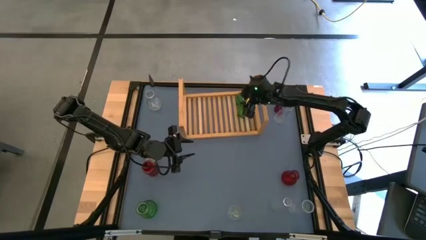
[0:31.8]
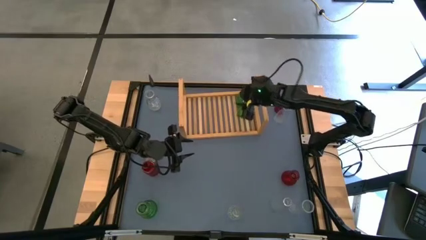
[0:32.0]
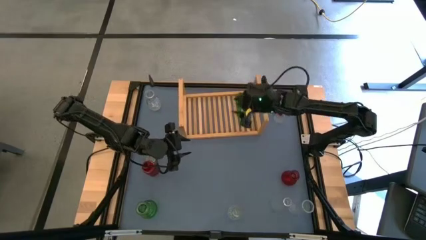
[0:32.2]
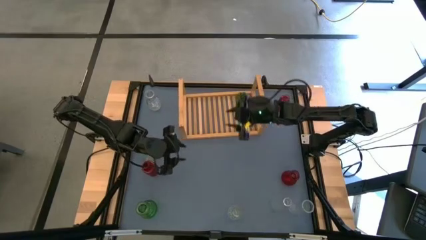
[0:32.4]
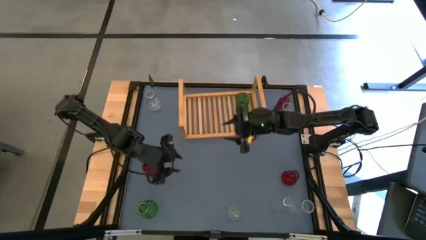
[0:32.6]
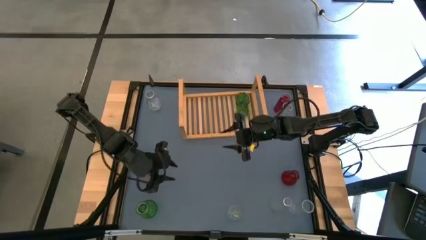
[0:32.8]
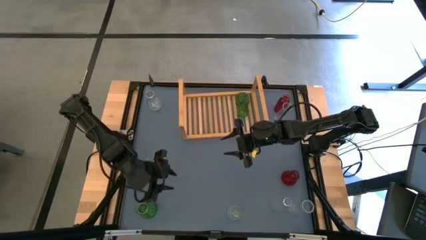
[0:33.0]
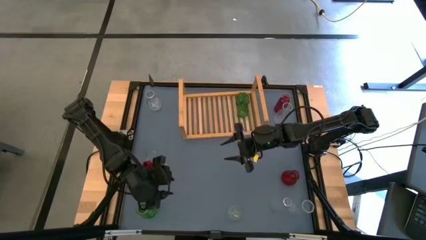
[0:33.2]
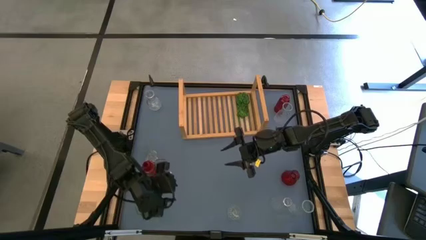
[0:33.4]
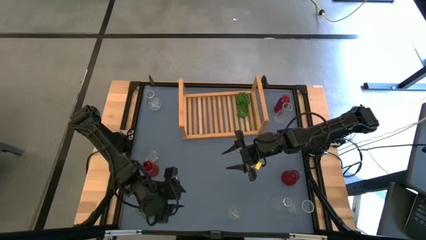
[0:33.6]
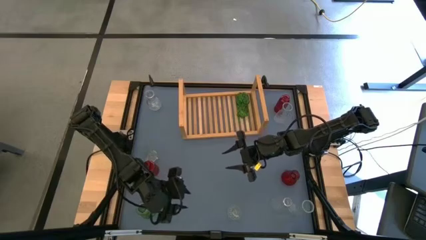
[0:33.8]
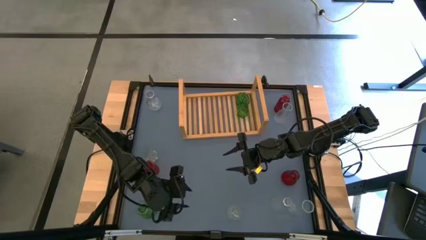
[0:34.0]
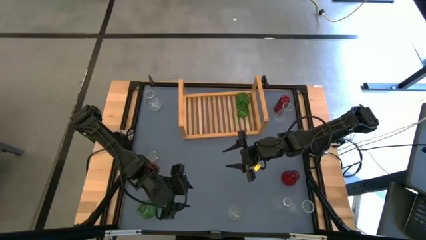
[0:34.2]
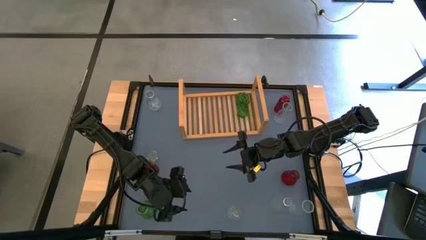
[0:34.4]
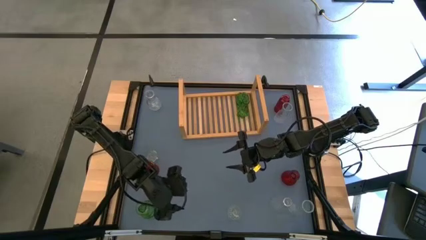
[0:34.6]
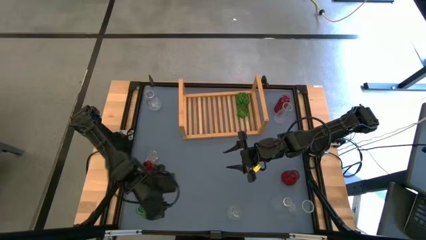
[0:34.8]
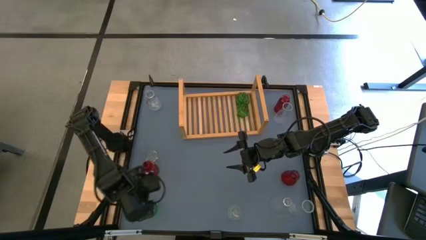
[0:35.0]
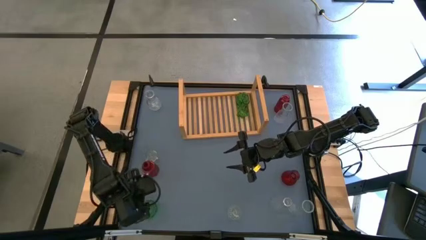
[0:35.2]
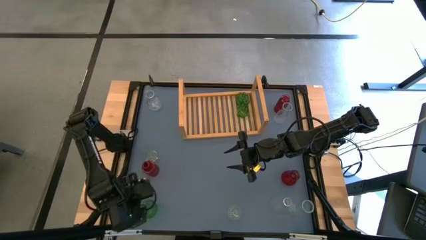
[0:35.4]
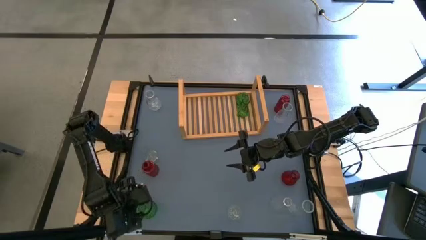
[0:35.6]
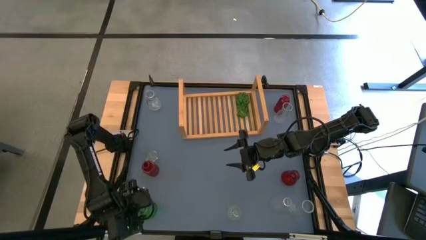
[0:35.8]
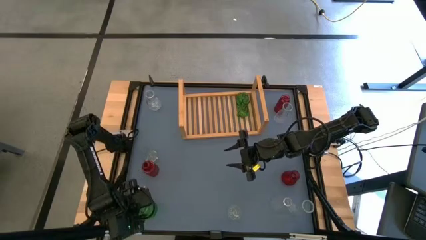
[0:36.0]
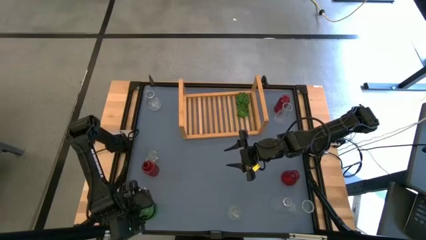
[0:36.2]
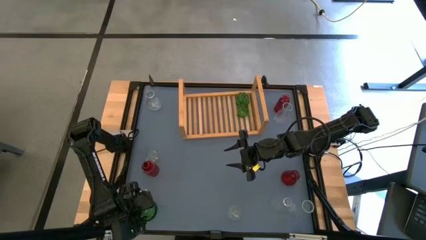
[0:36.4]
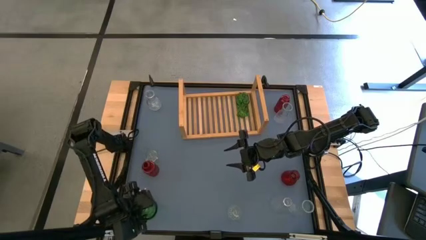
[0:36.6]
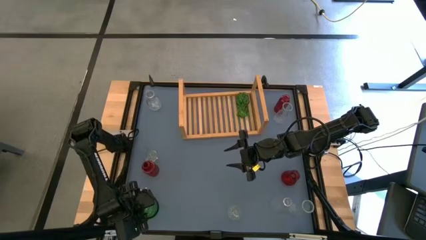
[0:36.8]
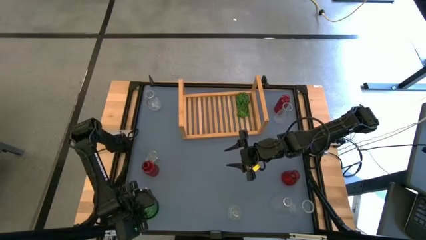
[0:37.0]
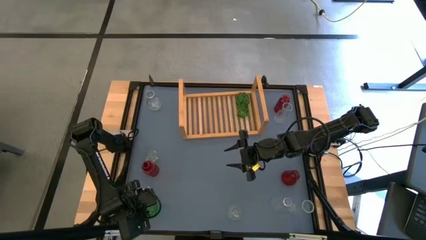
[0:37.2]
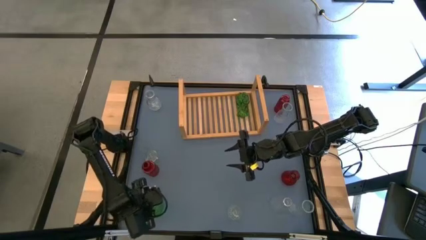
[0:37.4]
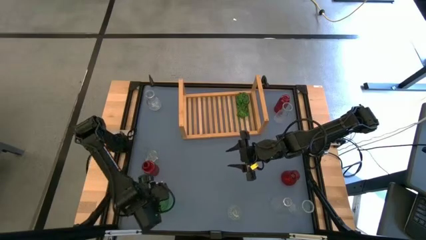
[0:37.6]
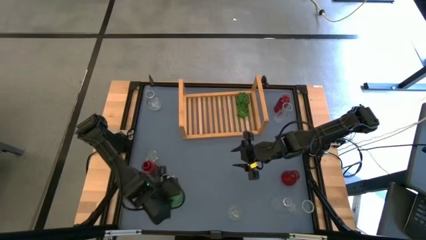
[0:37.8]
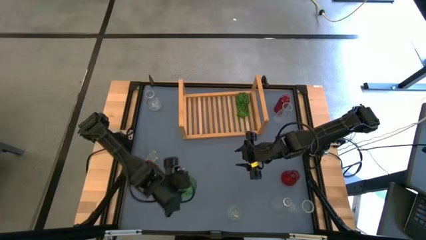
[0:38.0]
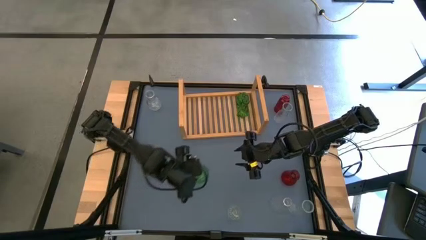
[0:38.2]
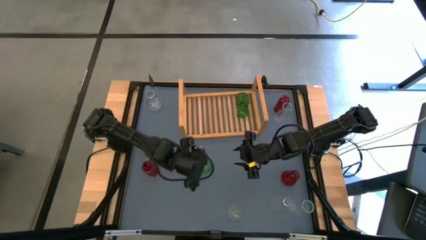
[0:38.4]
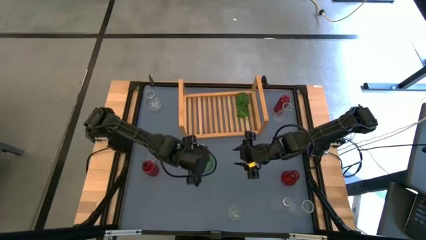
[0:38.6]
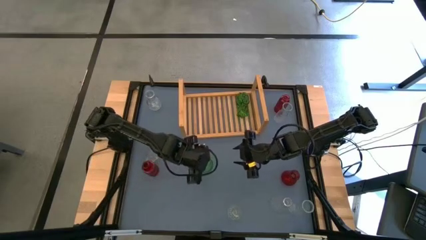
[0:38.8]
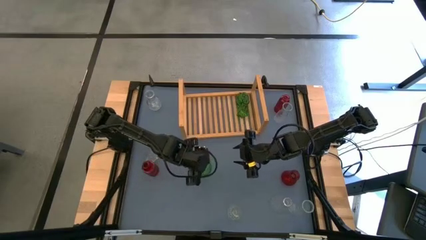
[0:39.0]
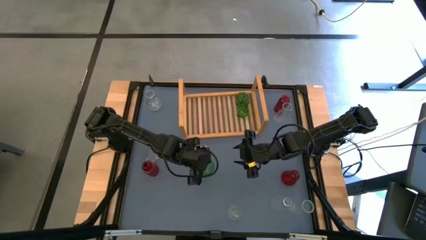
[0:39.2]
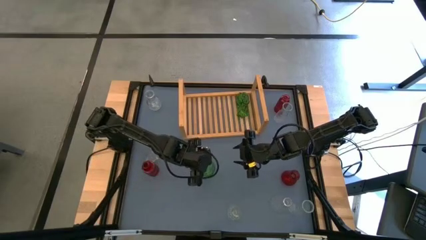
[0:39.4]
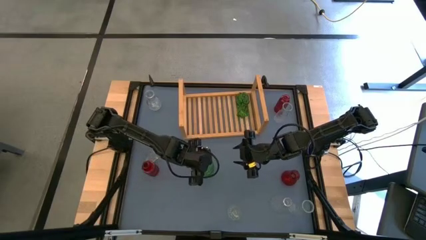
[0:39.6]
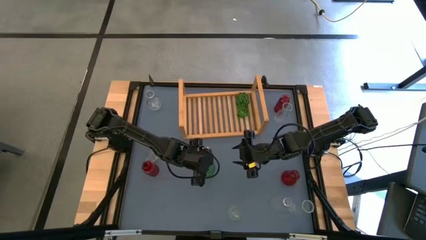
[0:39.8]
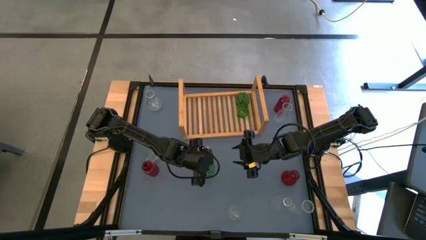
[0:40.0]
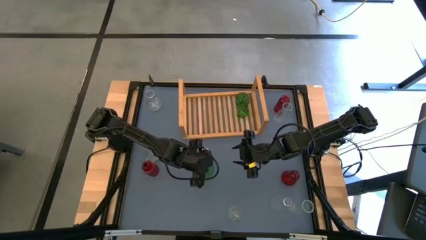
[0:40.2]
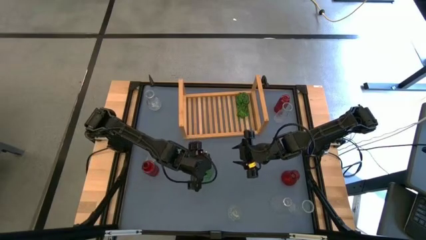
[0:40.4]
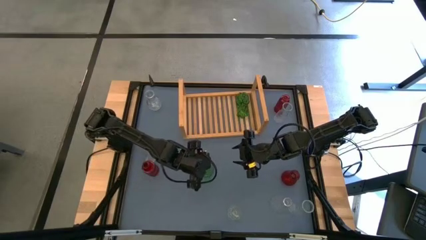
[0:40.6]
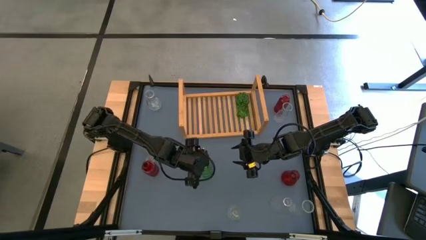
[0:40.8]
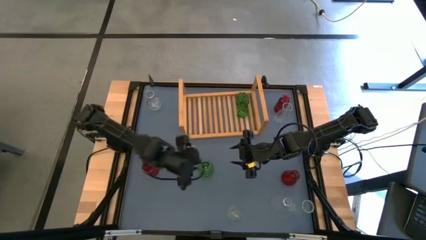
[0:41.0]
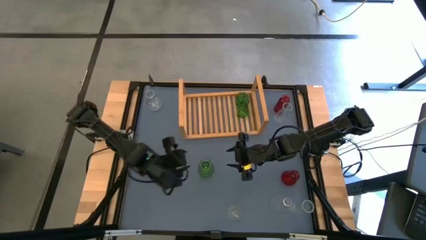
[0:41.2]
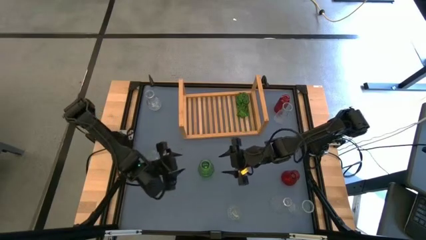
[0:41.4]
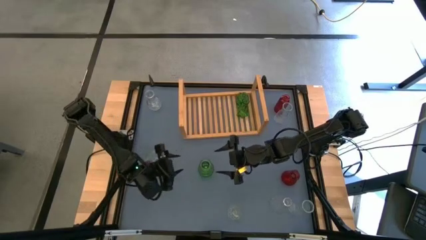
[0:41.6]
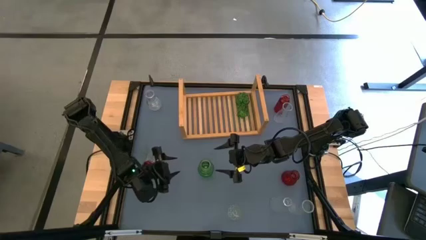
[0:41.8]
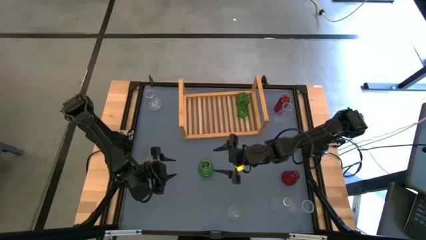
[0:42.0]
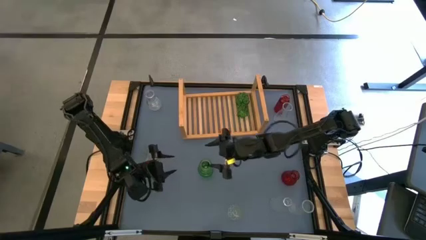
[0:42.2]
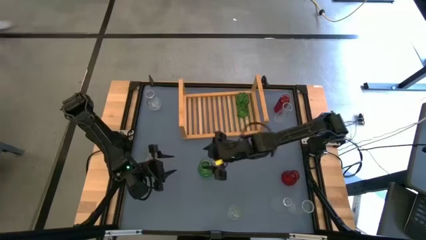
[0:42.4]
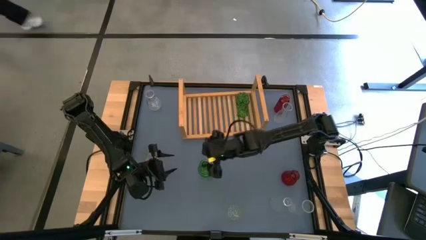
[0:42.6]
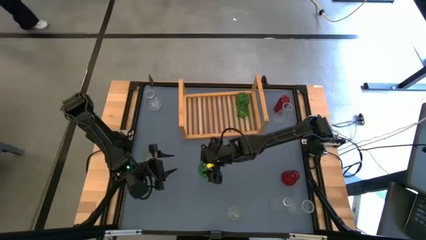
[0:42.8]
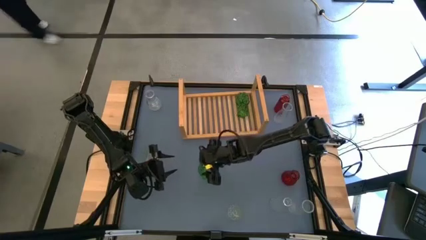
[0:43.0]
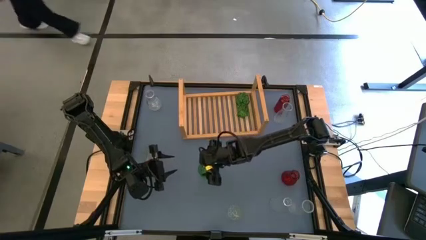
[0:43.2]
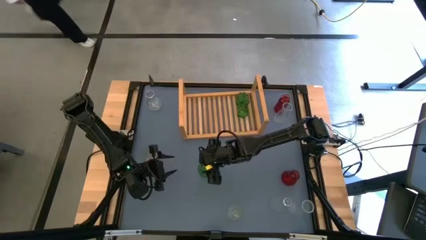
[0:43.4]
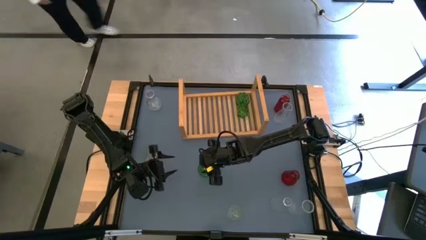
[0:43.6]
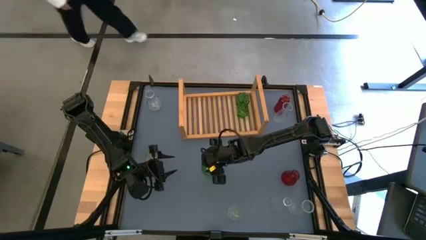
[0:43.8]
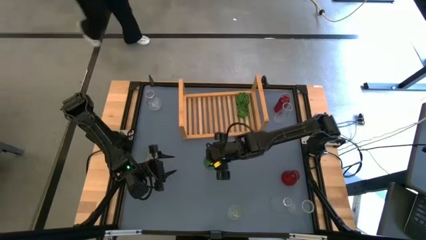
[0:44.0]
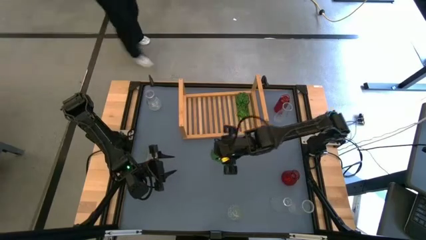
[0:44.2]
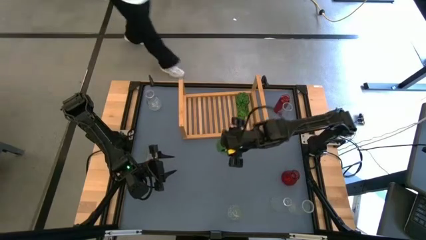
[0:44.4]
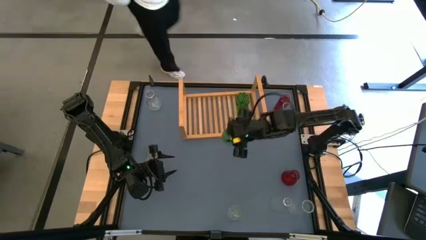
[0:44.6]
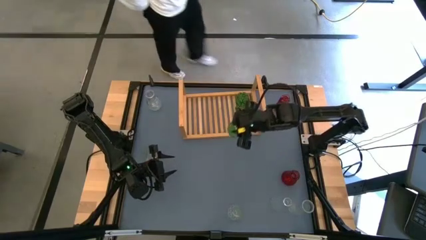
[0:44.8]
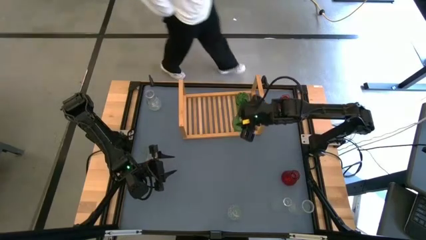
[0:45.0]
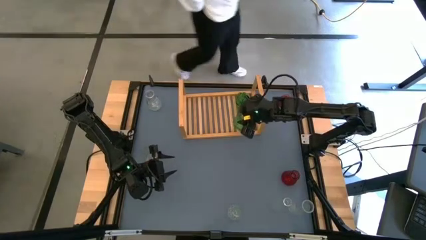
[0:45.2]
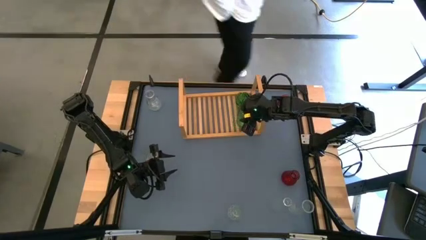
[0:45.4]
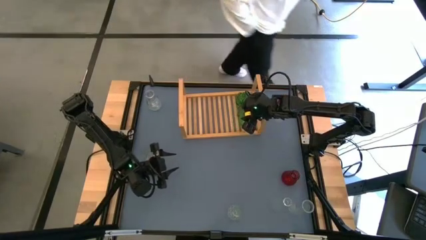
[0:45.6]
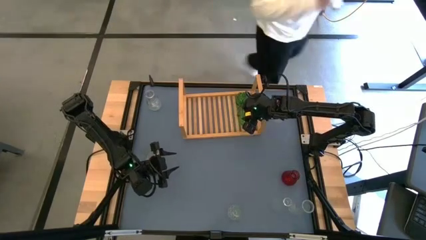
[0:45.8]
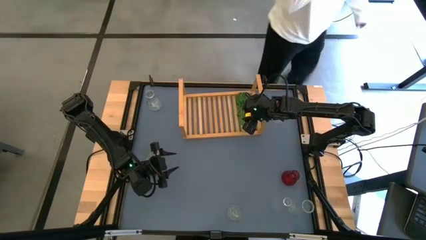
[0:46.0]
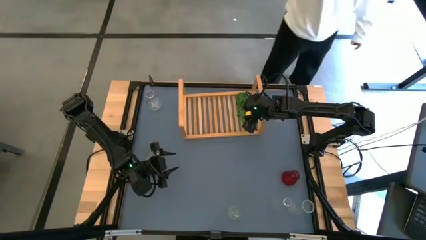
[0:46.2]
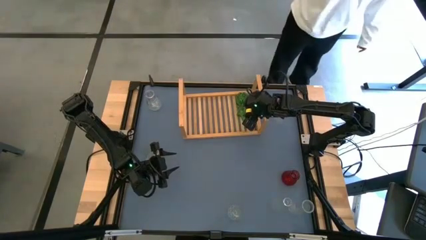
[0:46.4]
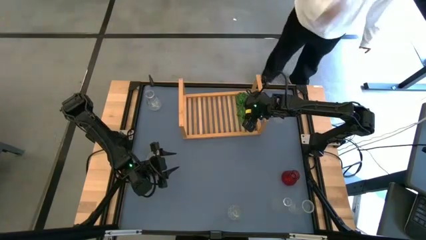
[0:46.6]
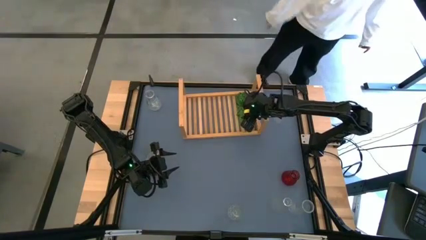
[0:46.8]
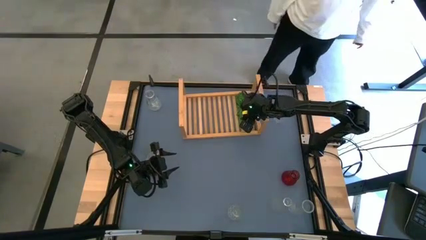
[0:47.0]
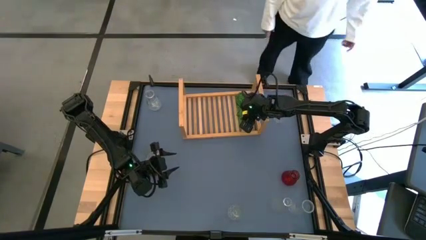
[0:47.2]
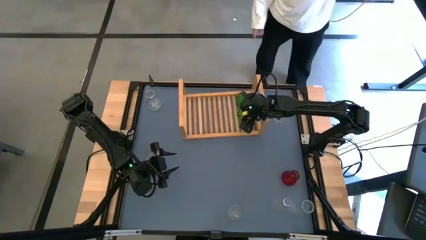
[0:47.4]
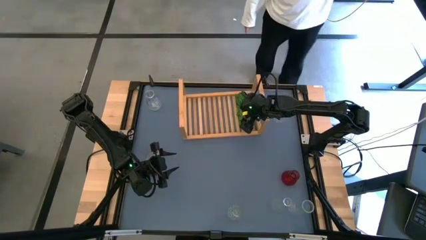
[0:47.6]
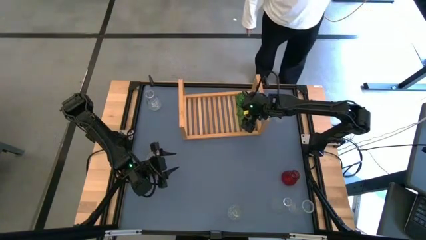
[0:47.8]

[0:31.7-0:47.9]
Task: sort vases onto shelf
Put the green vase on the shelf aligned with the other green vase
